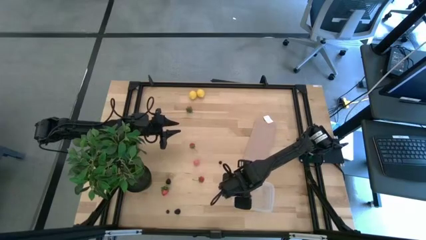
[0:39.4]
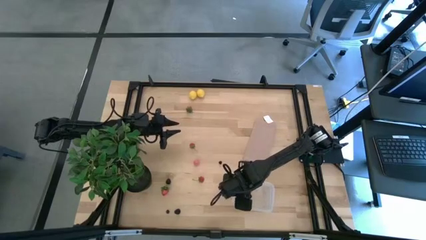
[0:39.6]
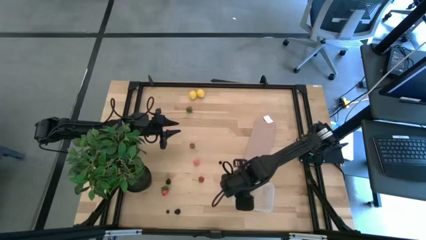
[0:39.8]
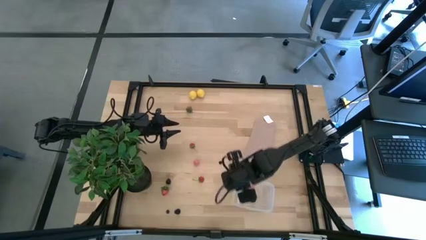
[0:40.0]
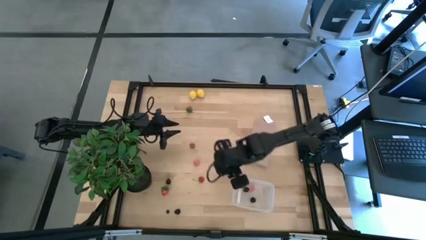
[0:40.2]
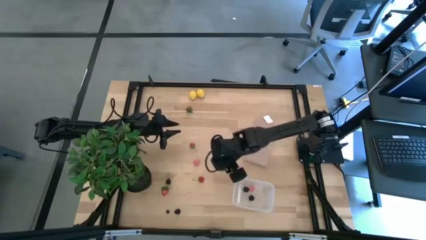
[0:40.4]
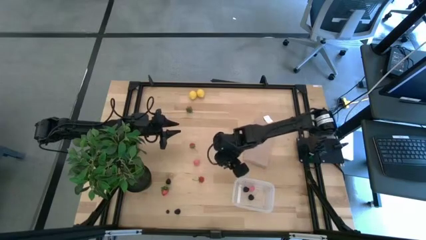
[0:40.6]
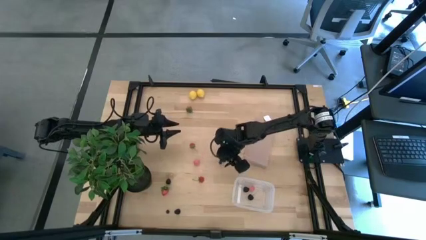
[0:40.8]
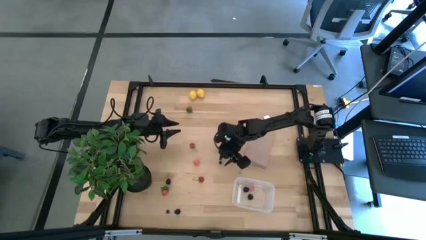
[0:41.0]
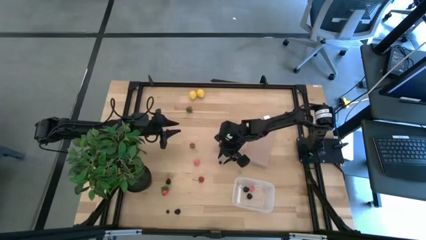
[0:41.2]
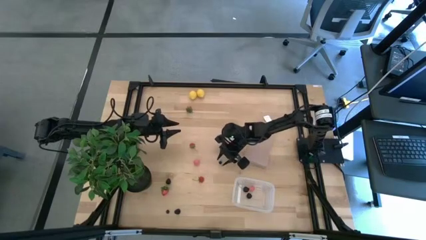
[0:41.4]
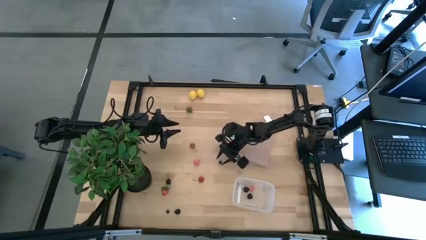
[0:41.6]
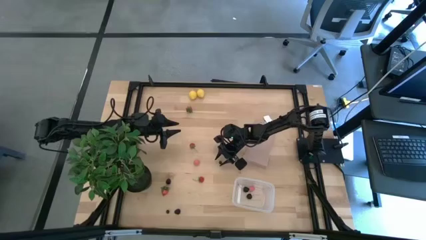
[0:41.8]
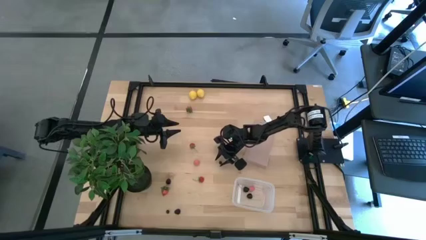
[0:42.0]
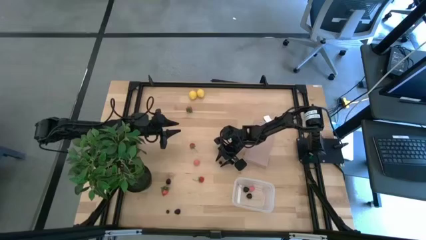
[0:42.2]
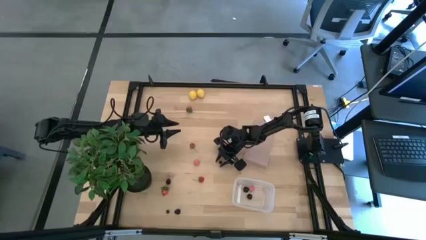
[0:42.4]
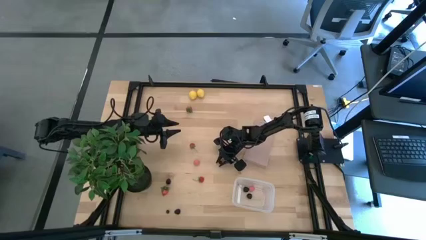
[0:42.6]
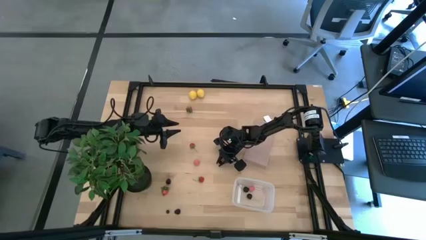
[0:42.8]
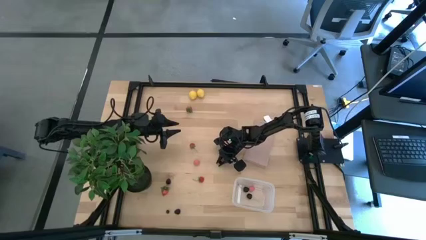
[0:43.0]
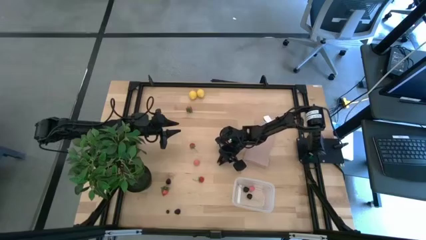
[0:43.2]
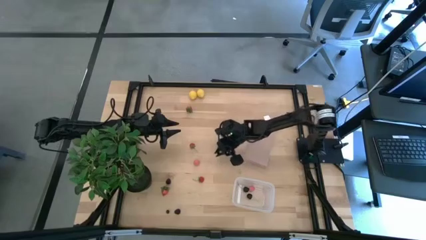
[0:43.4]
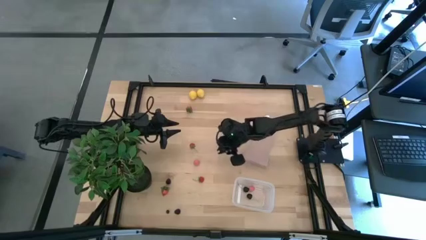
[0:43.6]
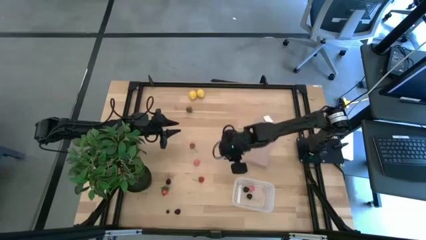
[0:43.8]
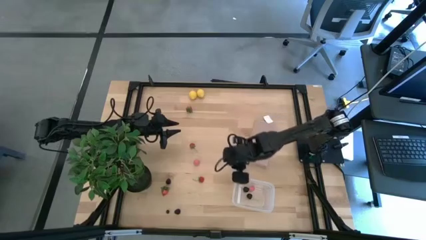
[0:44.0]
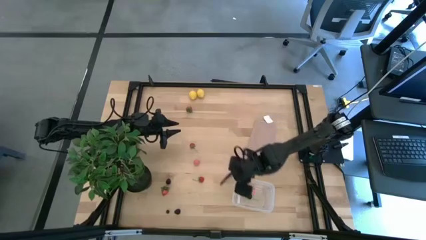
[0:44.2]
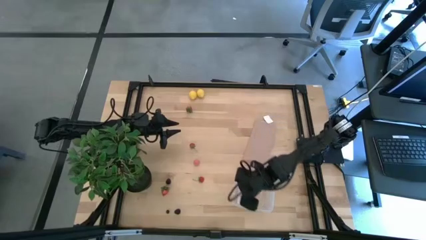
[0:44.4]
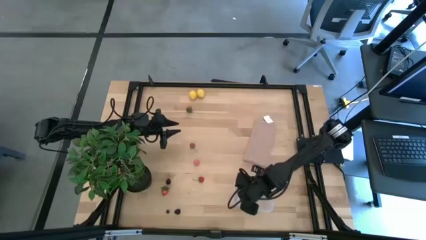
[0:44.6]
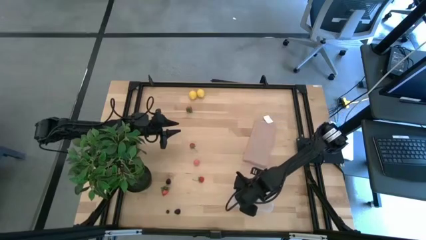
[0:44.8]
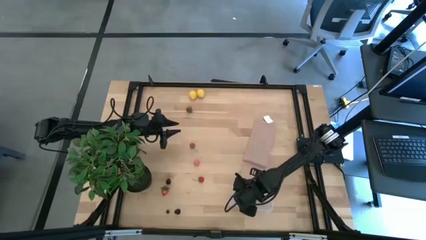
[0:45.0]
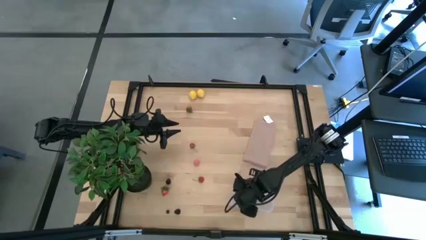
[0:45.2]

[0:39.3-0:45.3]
Task: Pick and placing Produce into tupperware
Put the blueberry into the transparent container

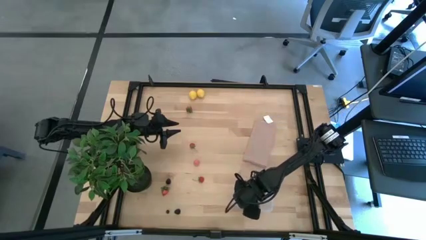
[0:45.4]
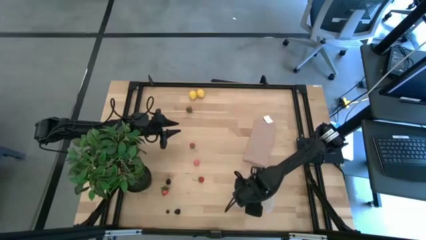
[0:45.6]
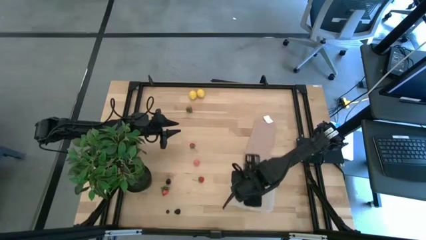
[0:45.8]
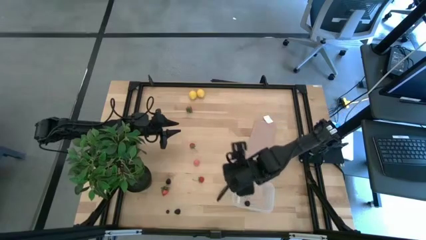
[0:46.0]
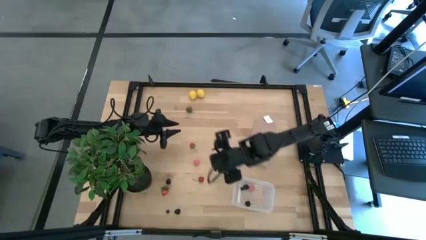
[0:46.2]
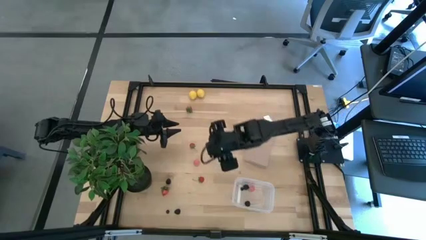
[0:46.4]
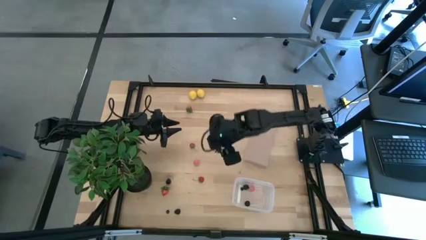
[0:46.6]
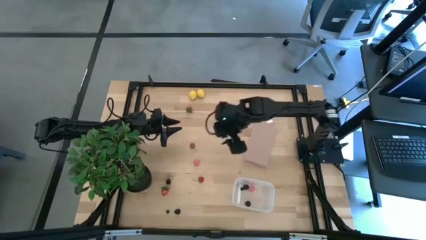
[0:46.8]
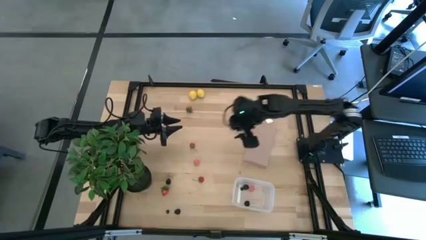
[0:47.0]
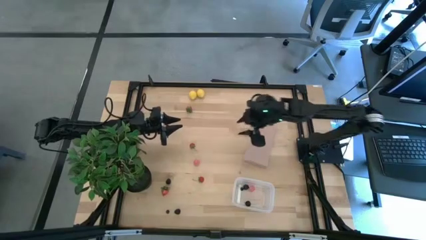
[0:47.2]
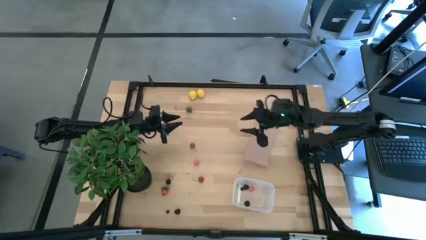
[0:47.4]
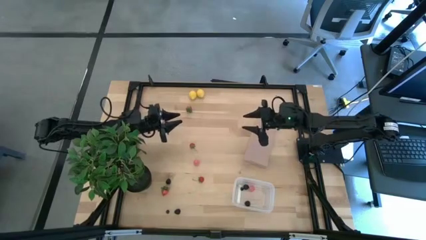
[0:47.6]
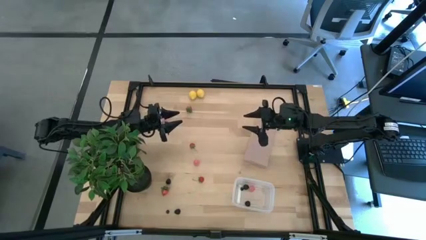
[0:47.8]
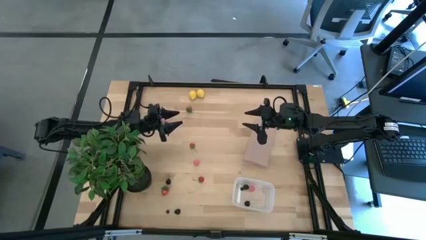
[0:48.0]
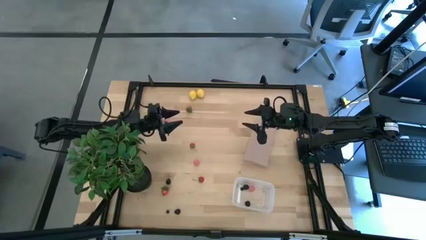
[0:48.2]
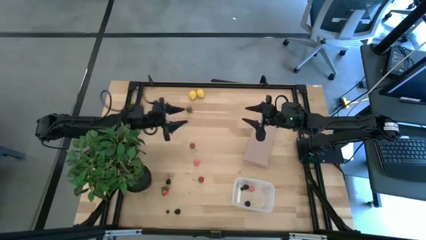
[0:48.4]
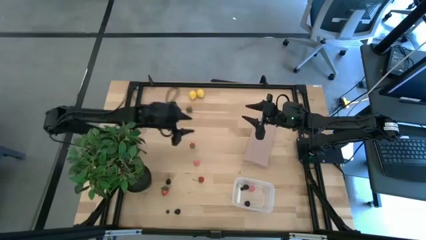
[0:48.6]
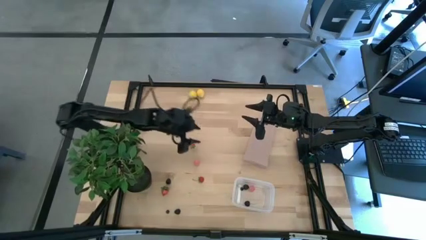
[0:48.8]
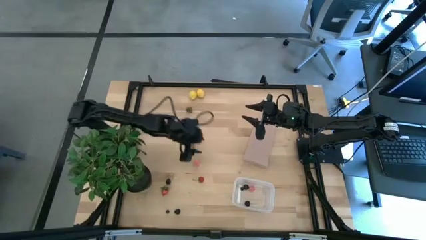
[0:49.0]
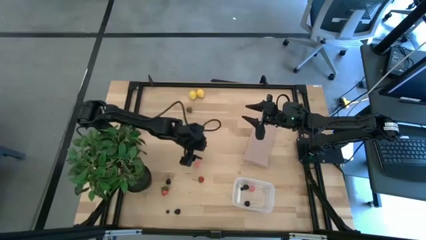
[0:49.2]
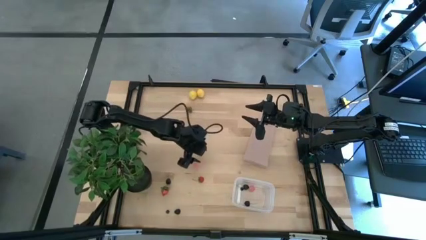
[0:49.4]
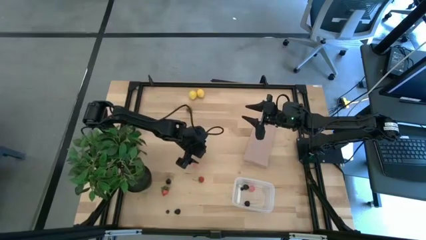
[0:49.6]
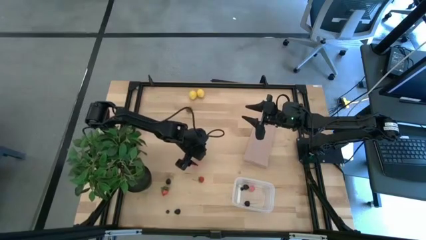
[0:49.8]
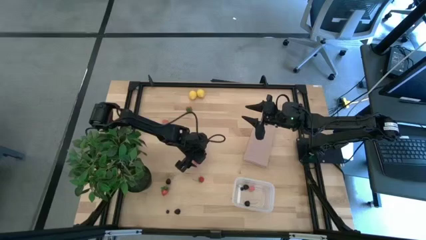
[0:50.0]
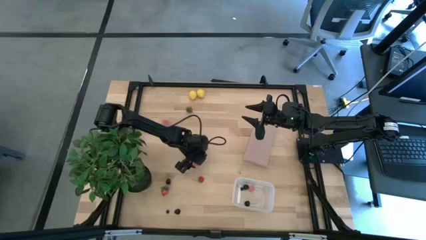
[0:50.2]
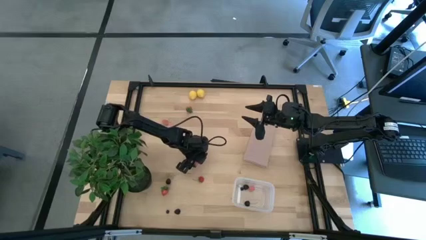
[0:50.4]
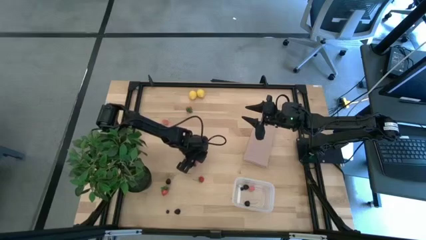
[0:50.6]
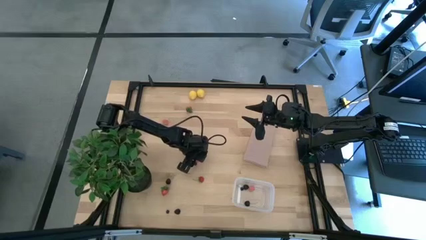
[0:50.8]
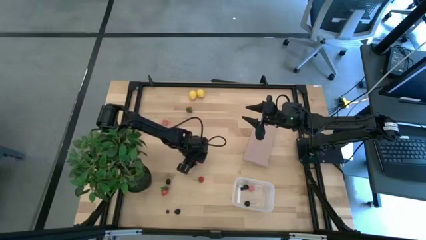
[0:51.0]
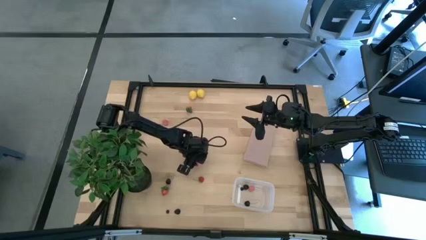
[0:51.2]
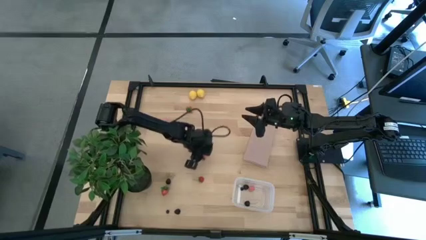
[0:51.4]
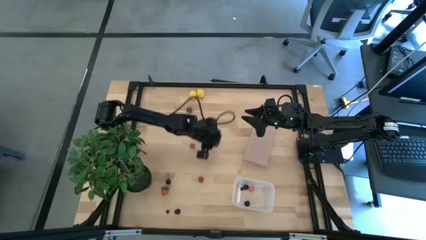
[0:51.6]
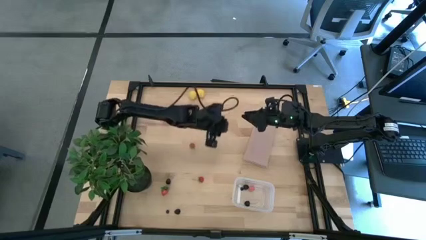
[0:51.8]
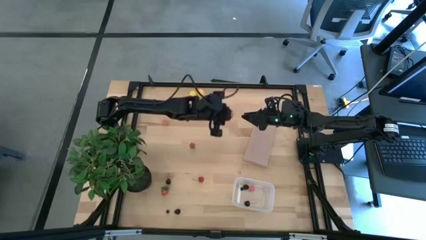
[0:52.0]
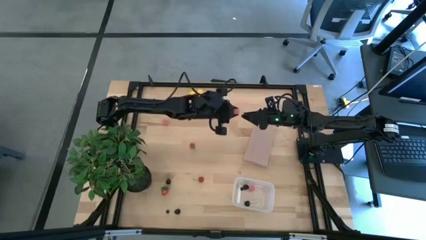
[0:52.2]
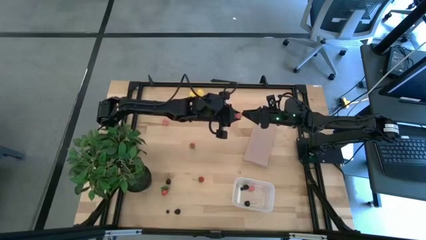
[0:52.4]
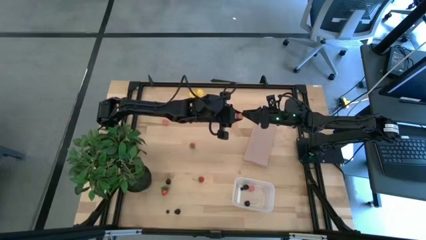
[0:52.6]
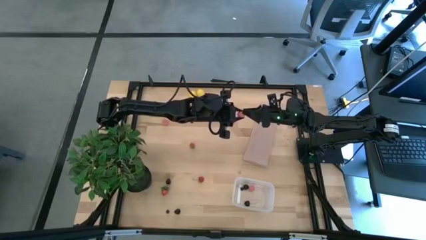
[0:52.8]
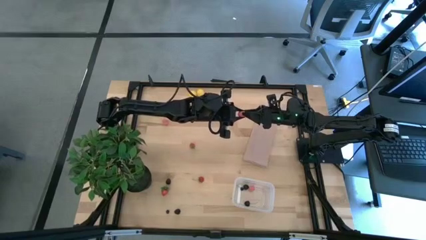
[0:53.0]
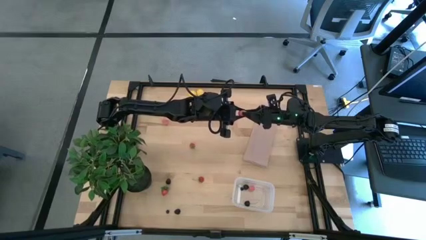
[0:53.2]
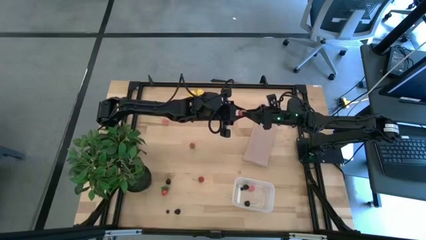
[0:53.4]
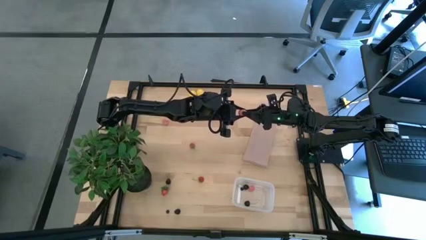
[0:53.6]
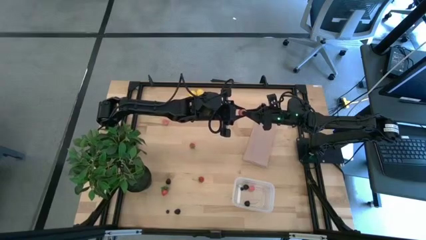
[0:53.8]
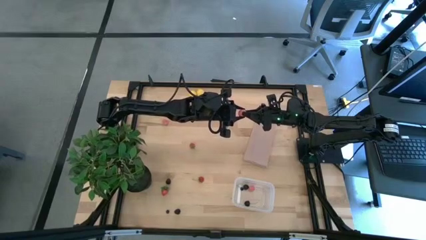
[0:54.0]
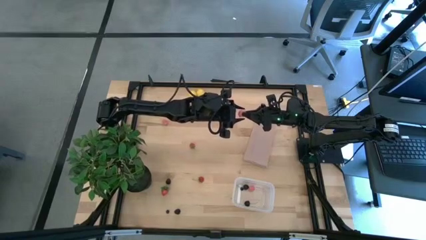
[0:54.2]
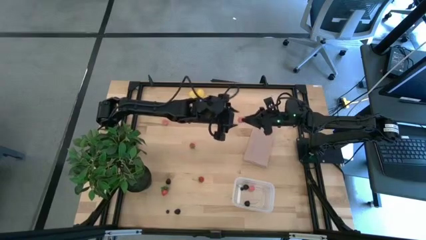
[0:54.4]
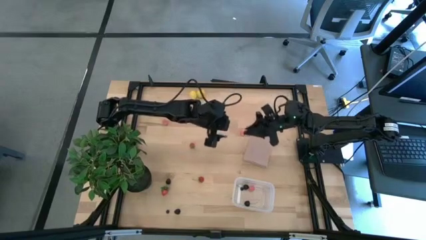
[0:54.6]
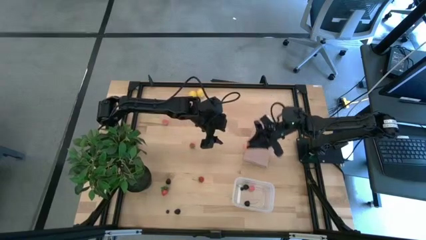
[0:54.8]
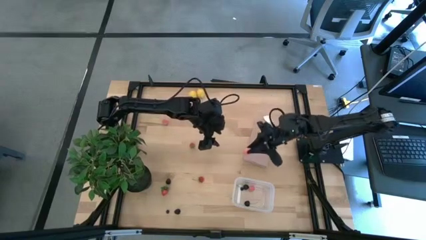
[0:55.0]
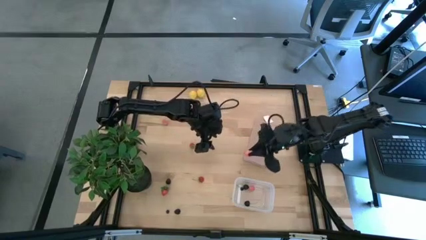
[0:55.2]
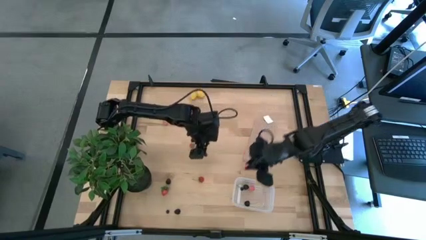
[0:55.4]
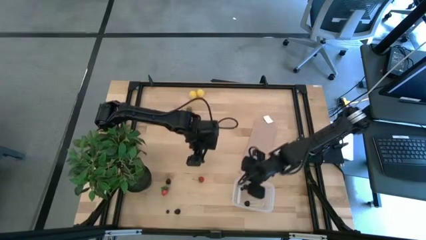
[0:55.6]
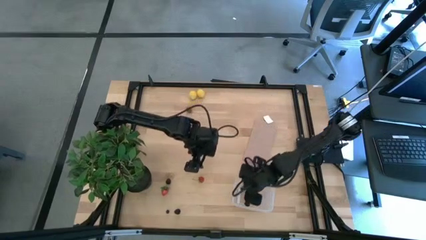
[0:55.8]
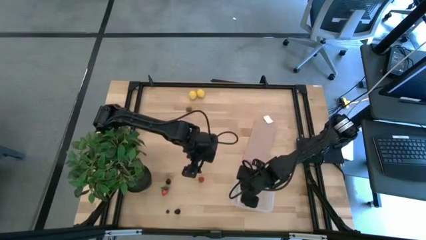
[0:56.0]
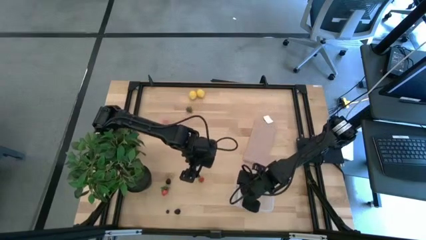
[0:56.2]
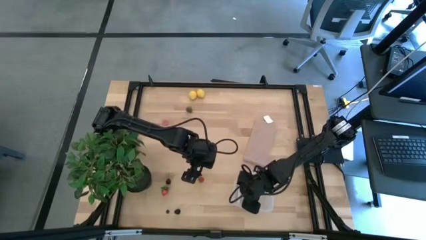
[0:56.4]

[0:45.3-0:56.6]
Put the peach into the transparent container
